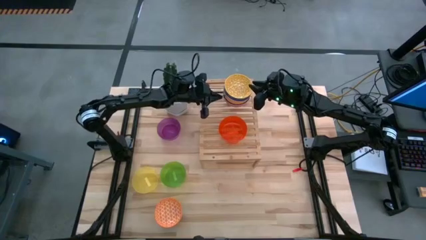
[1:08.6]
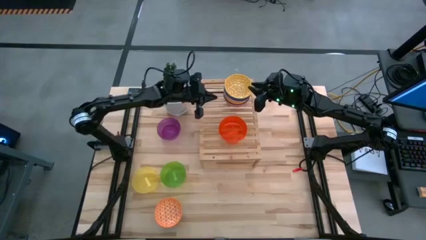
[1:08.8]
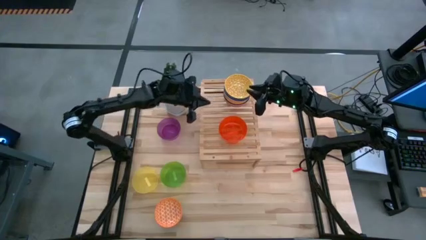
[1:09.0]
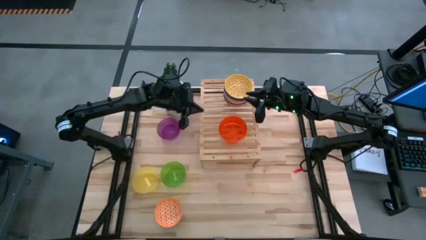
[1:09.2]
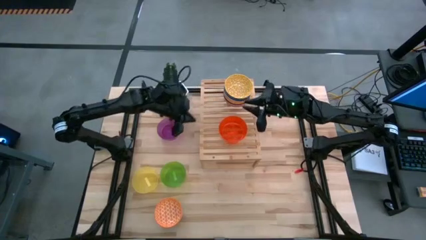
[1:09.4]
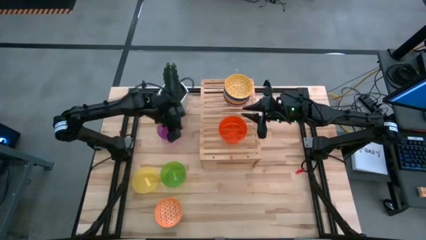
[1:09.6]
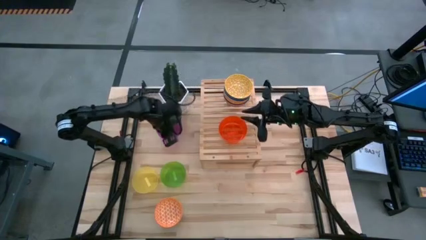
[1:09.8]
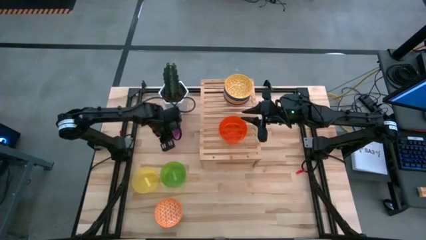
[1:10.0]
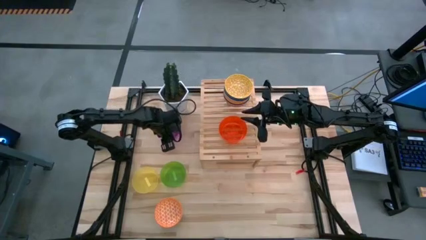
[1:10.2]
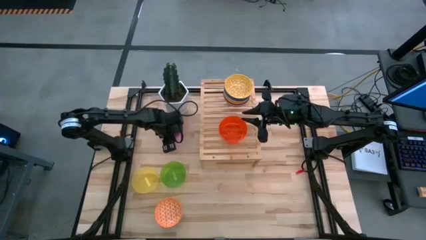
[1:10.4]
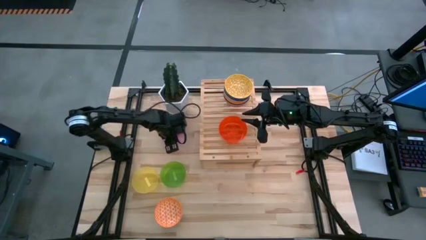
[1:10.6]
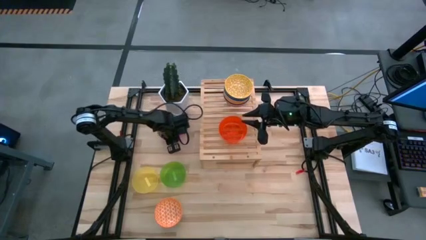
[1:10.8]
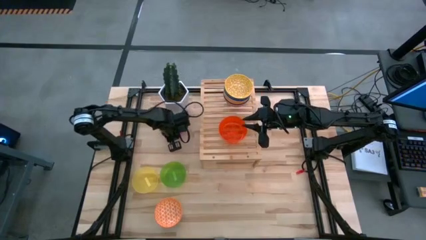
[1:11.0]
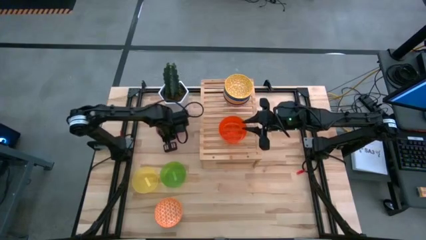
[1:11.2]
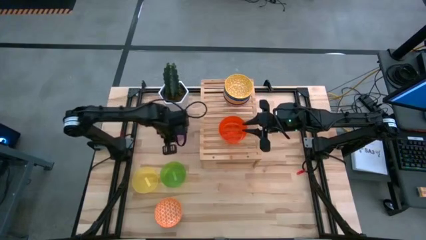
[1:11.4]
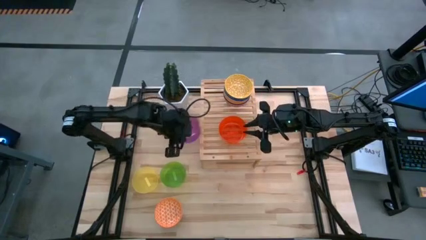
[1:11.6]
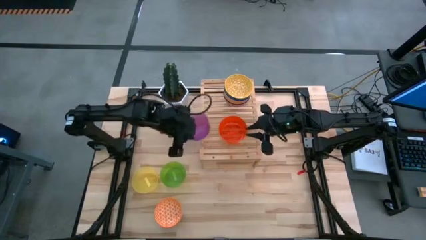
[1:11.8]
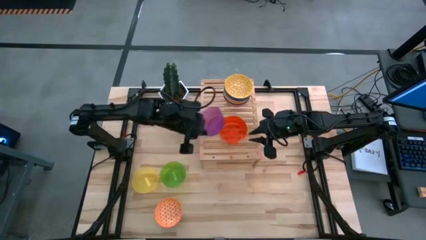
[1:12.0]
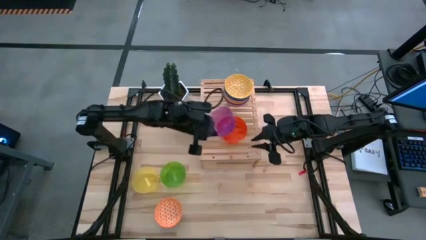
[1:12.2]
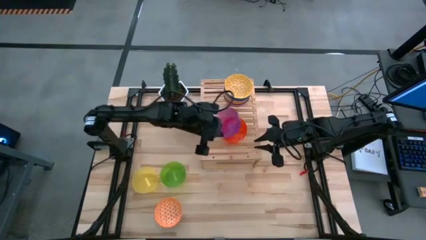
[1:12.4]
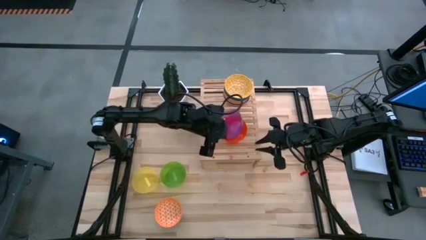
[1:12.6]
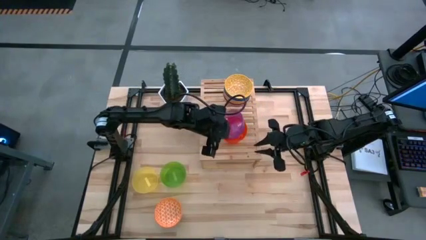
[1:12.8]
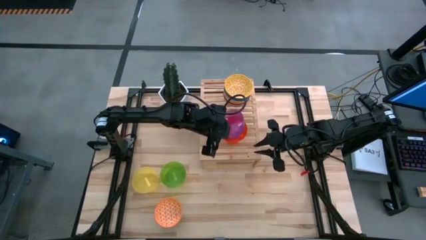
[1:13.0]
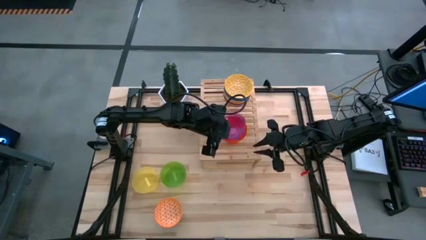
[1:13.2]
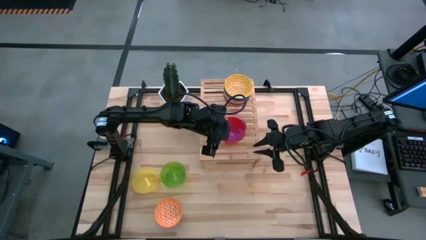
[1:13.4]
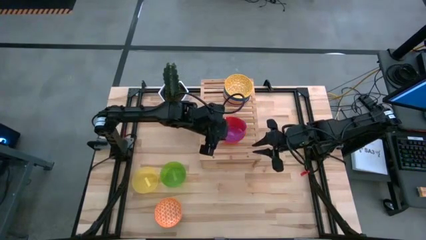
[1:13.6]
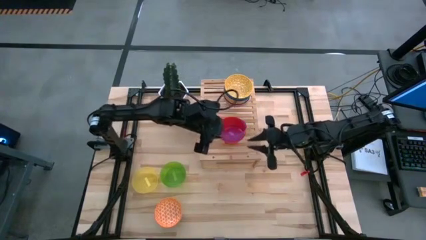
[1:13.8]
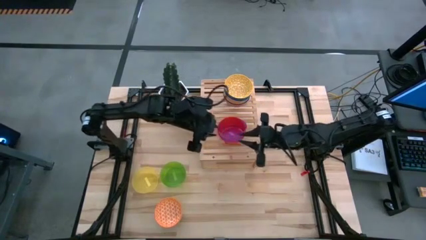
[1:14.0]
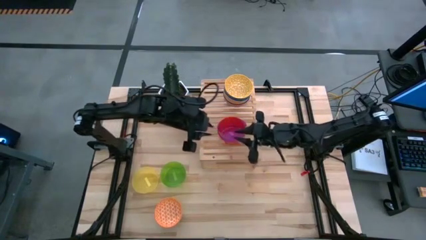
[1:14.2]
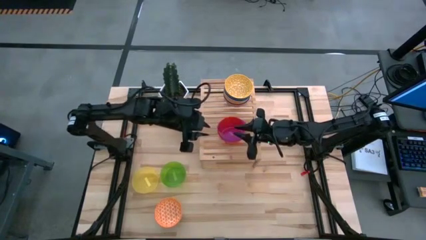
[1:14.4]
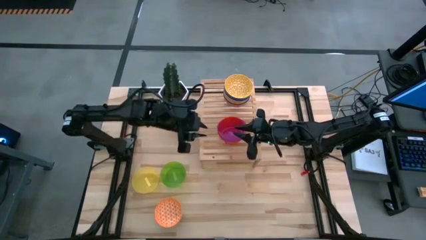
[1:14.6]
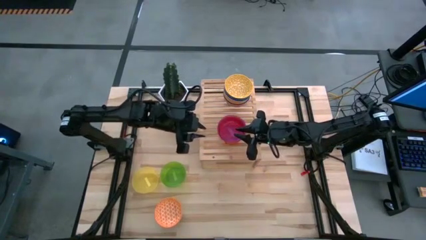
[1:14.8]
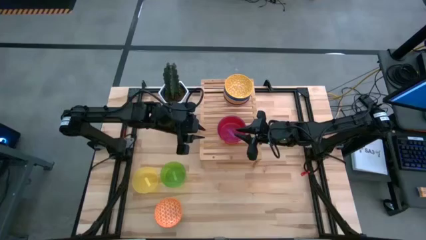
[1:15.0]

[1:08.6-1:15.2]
Task: Place and stack bowls onto a shelf
Stack the purple bowl on top the orange bowl on the shelf

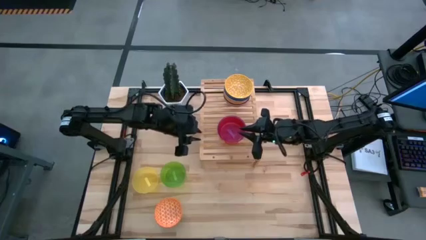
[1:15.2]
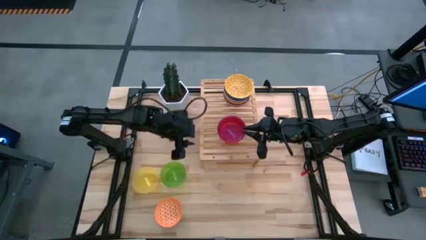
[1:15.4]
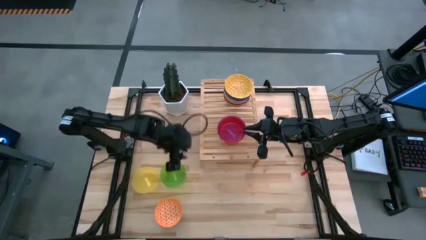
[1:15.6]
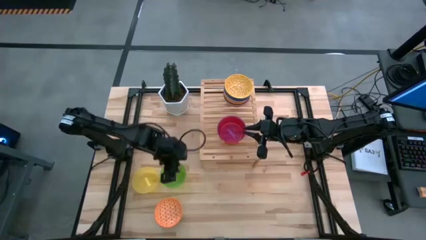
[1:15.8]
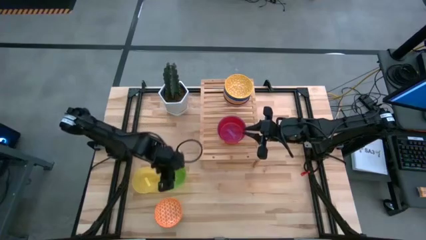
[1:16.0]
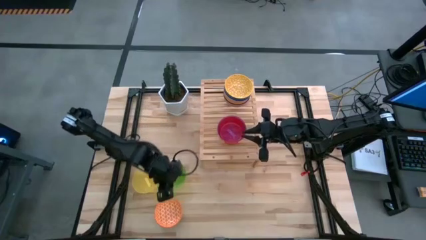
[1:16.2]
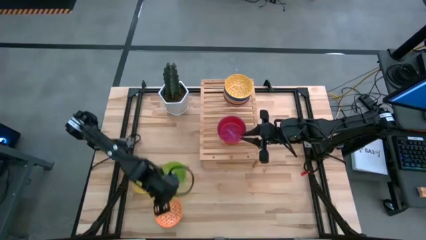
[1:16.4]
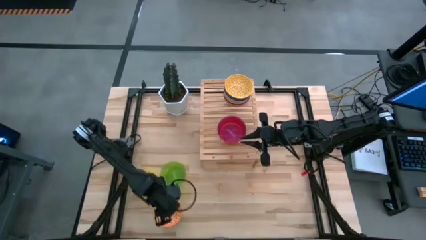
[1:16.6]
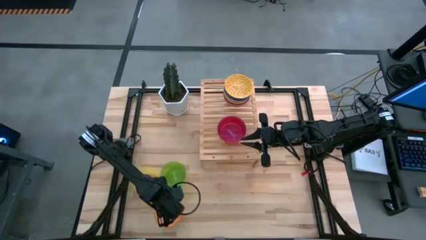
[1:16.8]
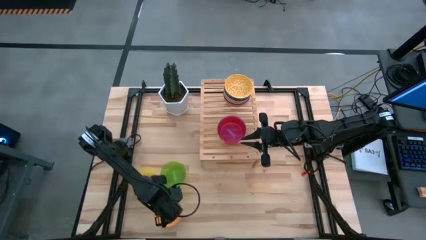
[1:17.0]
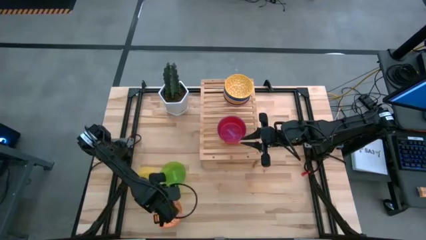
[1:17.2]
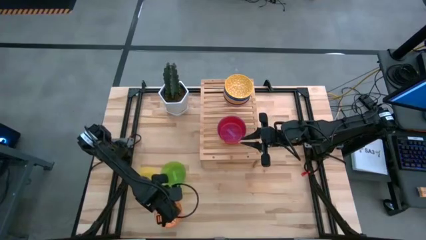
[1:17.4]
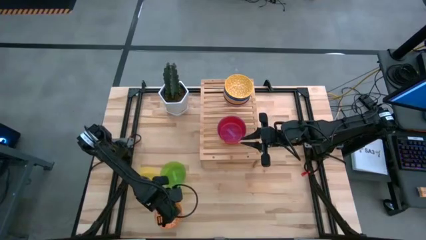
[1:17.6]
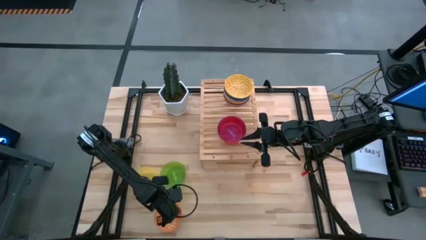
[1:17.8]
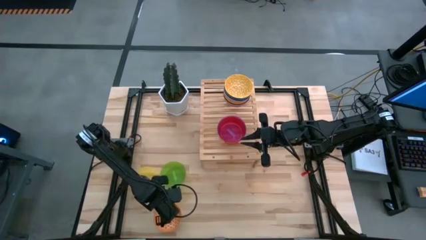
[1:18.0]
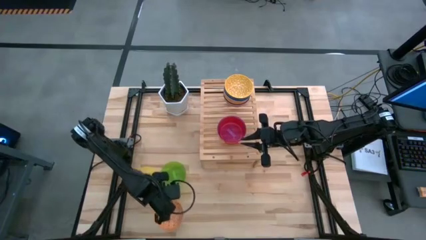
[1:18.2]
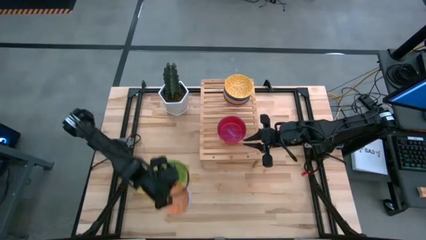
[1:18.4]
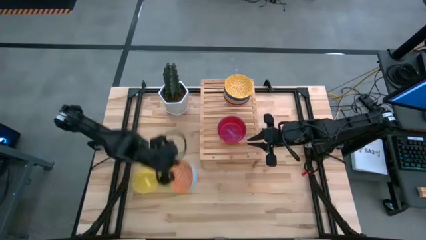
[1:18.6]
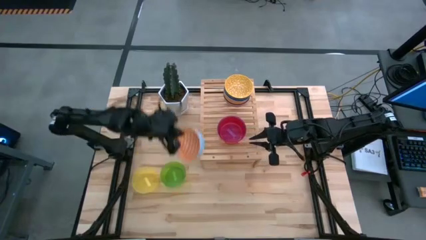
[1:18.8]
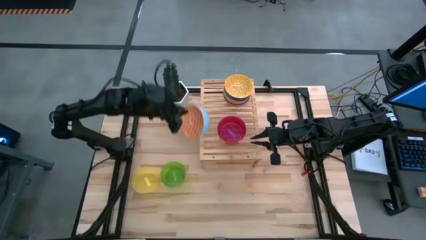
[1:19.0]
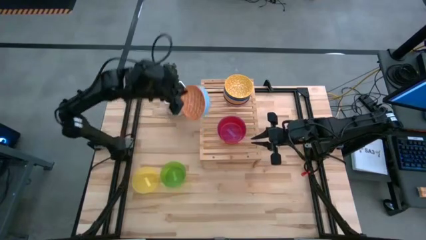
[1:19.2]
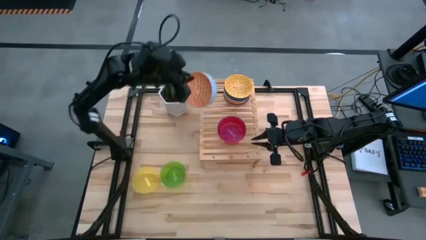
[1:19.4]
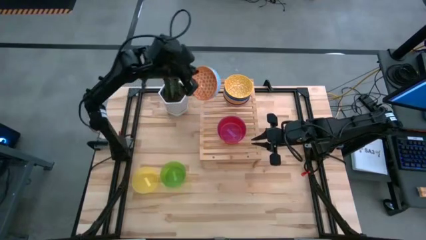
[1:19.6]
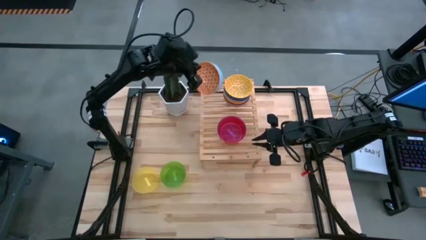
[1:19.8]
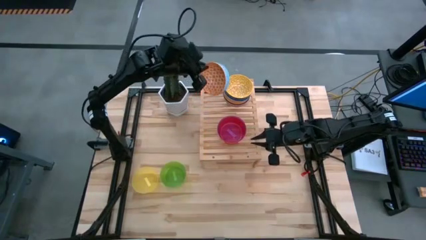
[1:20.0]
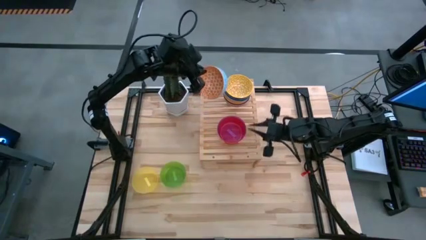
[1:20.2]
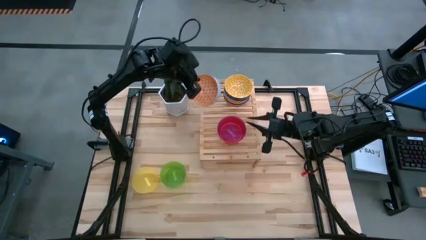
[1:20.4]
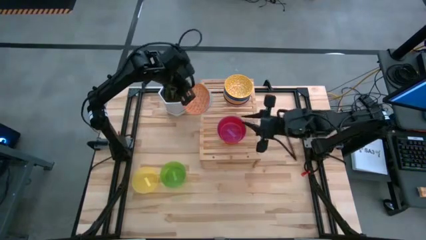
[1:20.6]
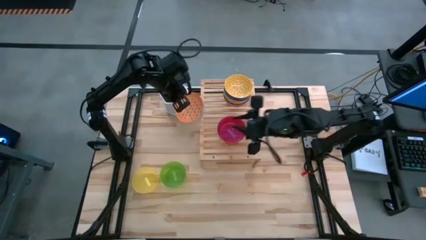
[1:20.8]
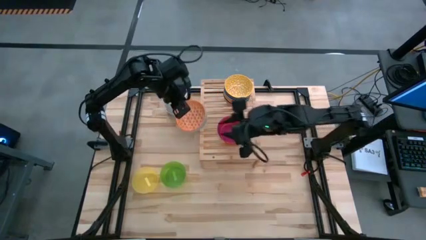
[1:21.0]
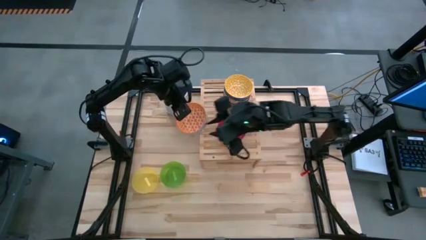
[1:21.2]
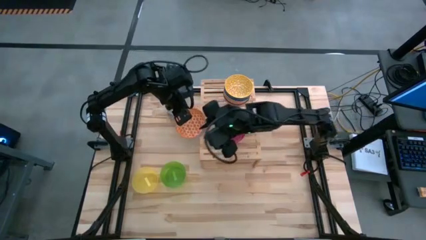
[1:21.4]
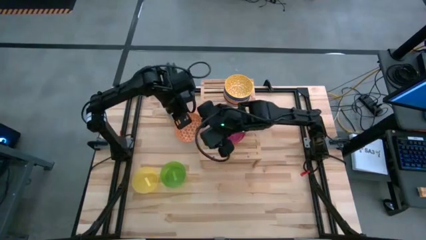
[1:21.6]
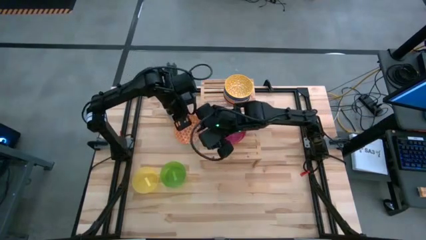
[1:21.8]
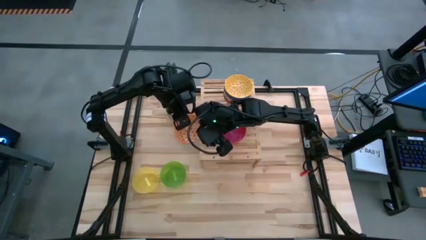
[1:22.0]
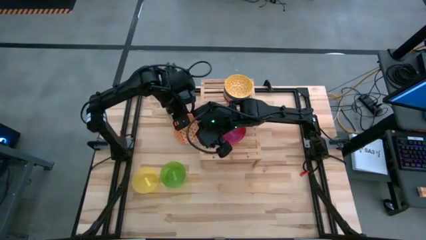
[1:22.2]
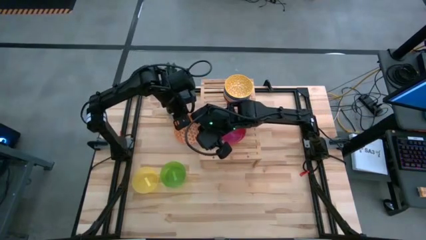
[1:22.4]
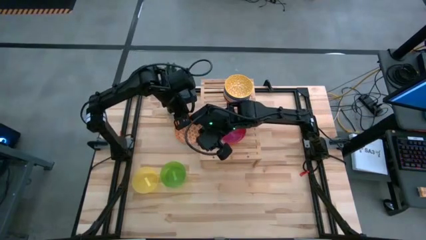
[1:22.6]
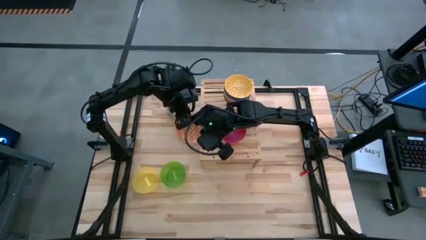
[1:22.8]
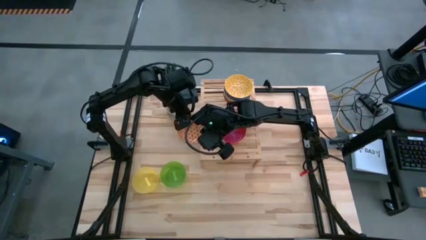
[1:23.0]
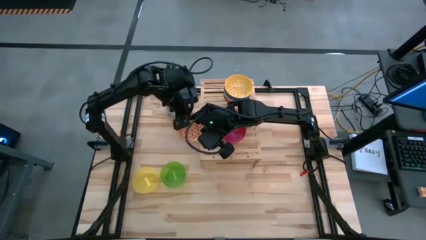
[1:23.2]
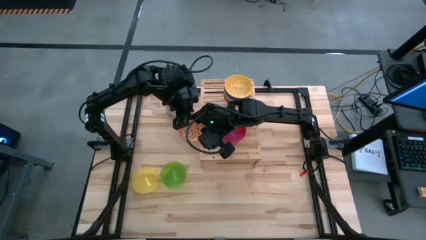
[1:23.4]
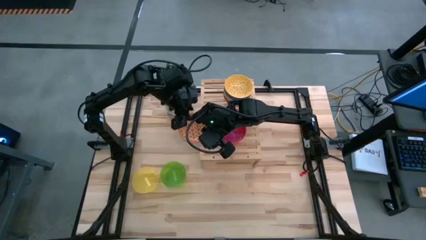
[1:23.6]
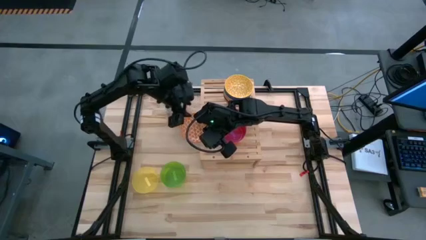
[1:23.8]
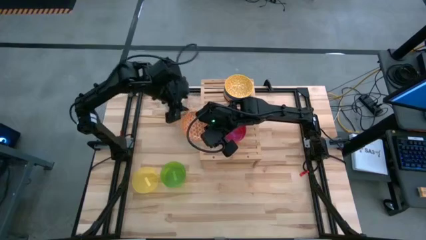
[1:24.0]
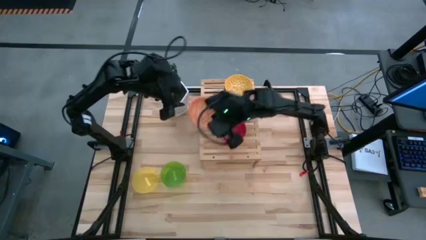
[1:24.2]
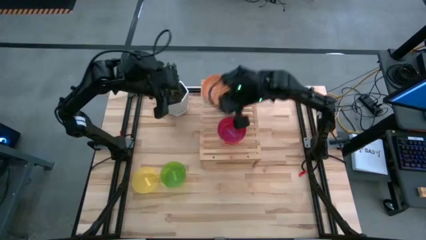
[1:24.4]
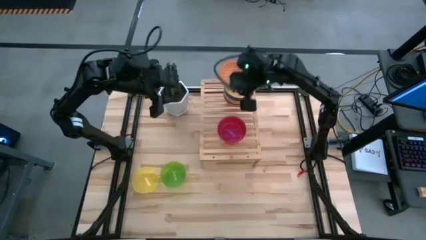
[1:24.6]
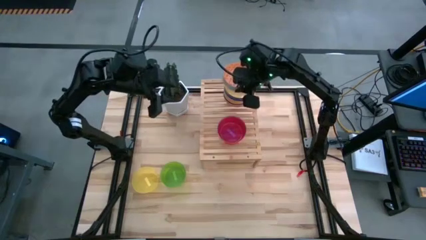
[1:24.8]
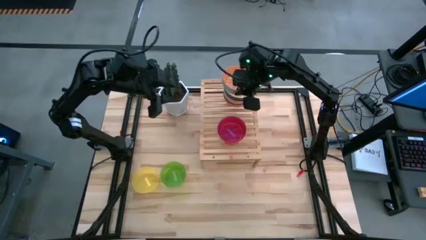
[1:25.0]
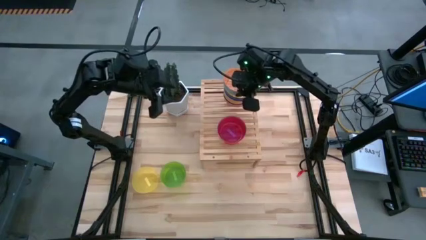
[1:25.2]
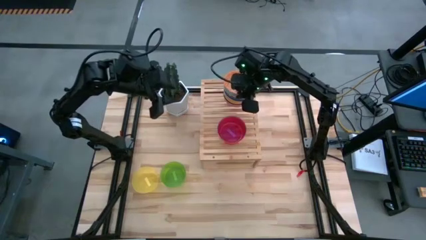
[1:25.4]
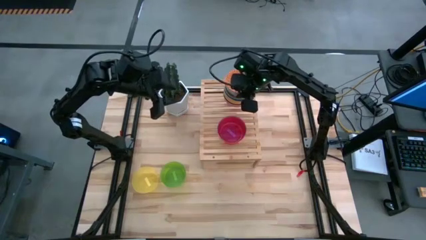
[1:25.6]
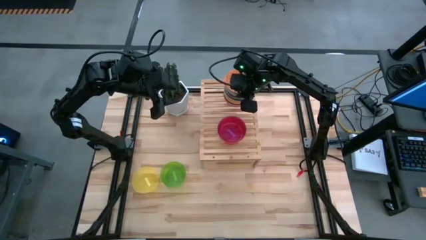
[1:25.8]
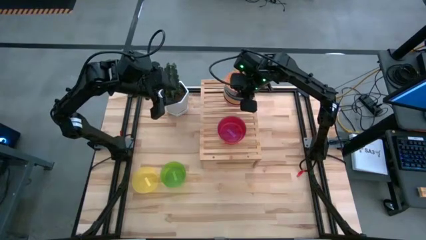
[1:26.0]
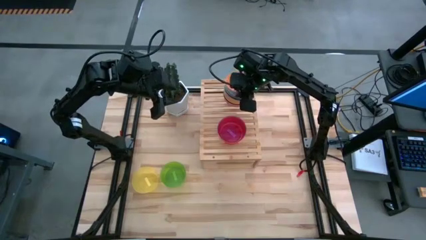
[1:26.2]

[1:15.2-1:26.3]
Stack the orange patterned bowl on top of the yellow patterned bowl on the shelf
